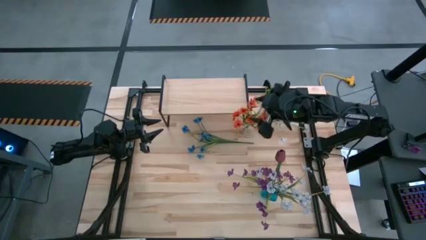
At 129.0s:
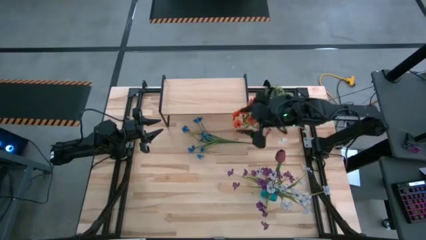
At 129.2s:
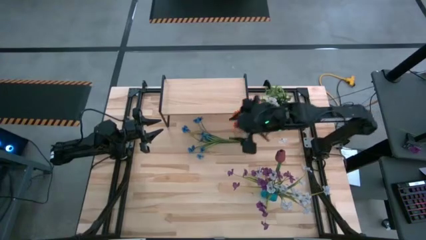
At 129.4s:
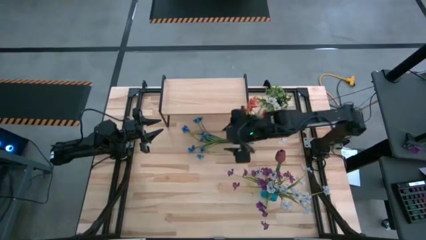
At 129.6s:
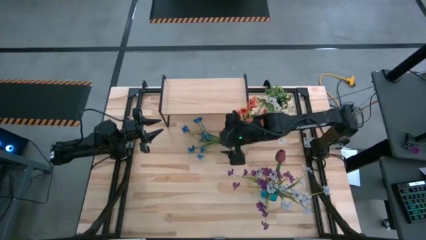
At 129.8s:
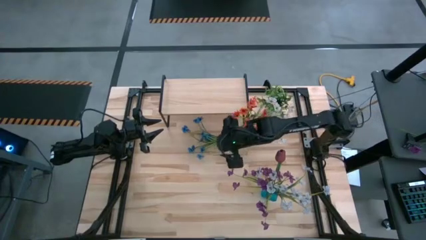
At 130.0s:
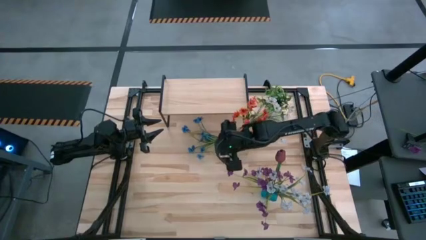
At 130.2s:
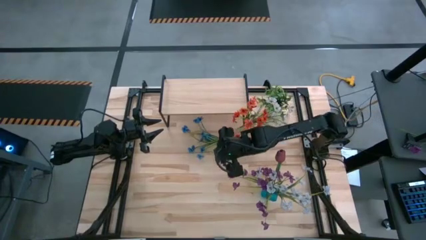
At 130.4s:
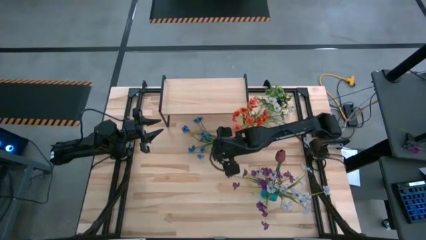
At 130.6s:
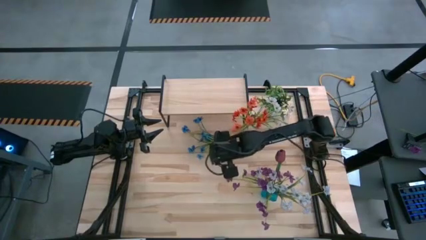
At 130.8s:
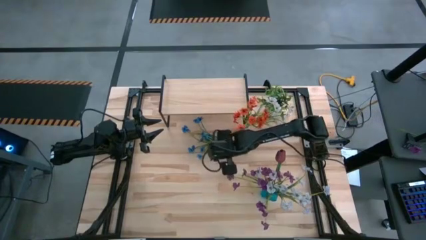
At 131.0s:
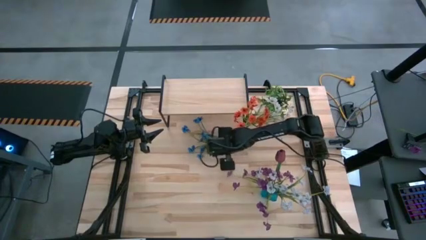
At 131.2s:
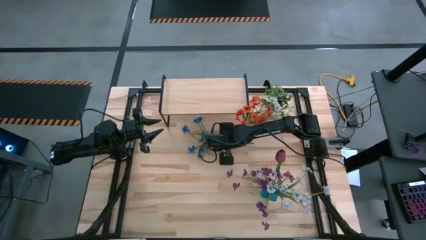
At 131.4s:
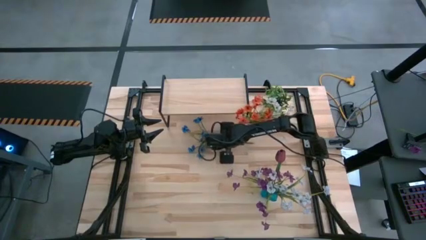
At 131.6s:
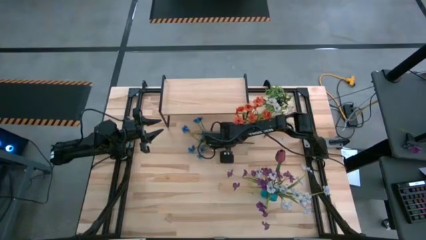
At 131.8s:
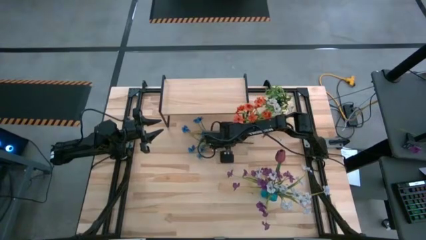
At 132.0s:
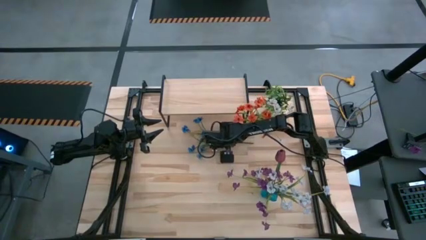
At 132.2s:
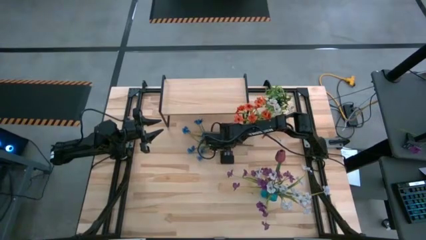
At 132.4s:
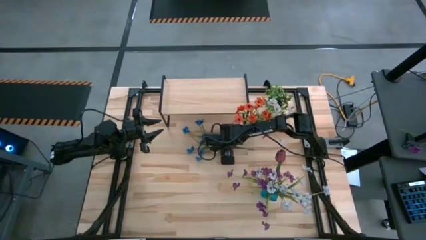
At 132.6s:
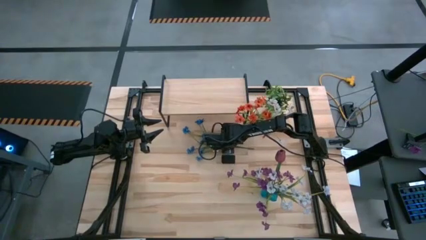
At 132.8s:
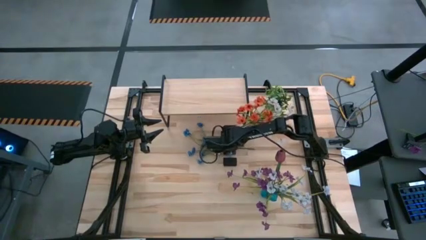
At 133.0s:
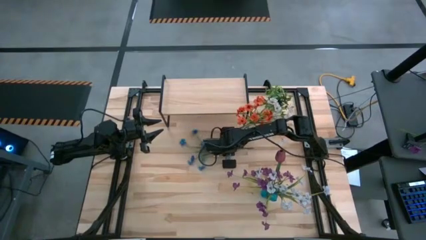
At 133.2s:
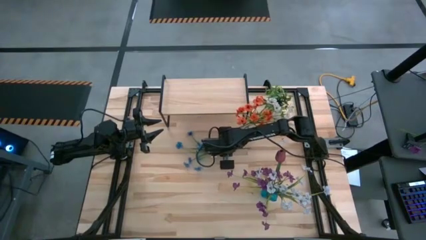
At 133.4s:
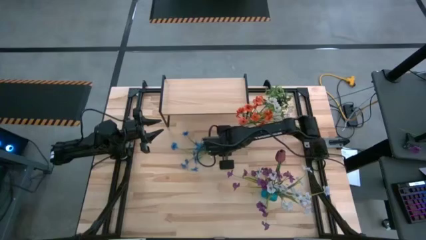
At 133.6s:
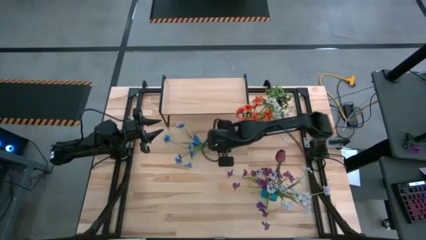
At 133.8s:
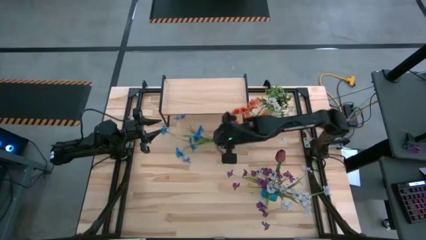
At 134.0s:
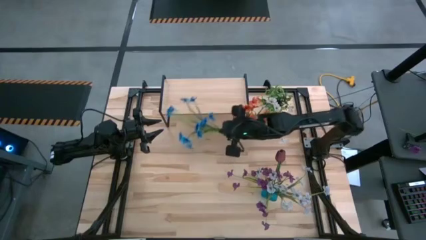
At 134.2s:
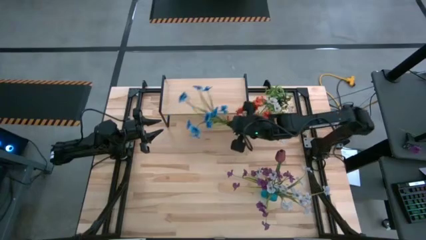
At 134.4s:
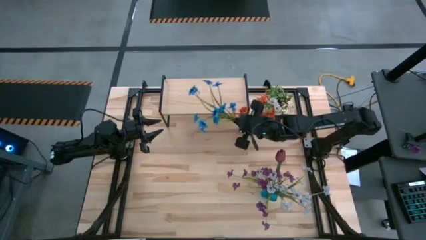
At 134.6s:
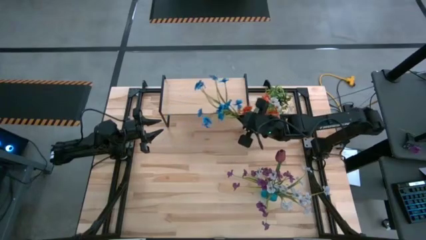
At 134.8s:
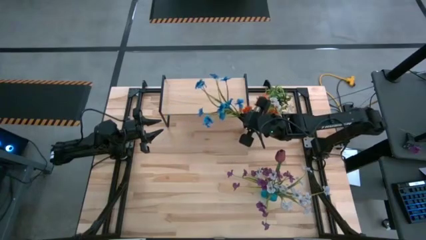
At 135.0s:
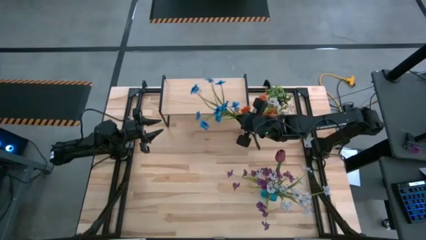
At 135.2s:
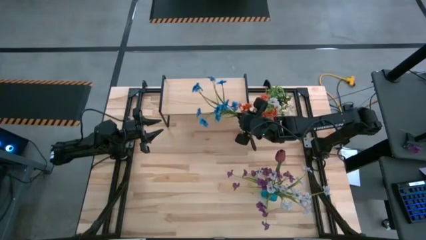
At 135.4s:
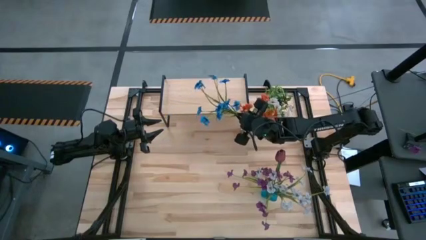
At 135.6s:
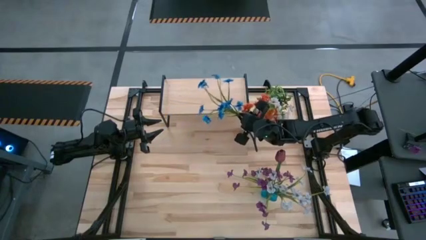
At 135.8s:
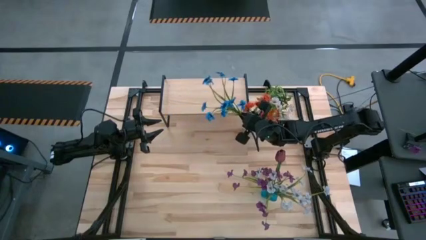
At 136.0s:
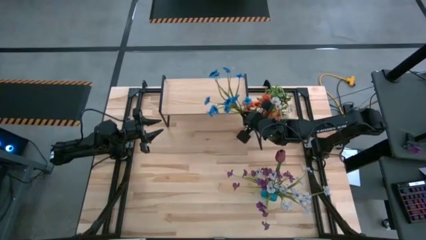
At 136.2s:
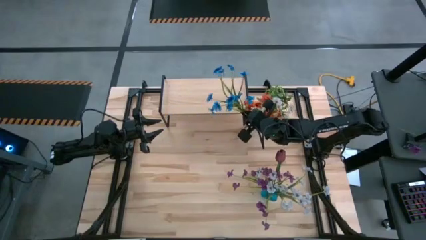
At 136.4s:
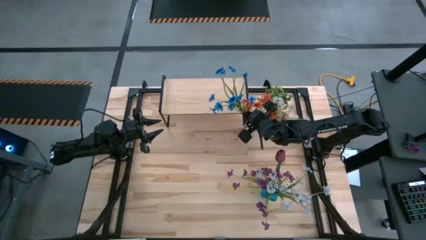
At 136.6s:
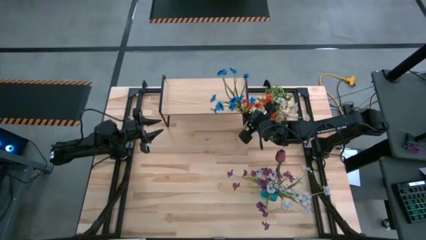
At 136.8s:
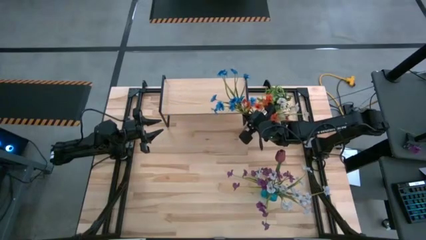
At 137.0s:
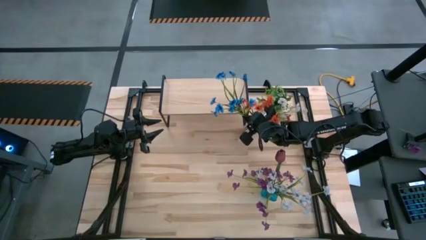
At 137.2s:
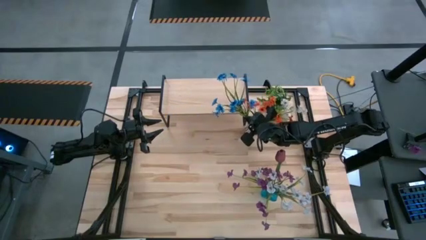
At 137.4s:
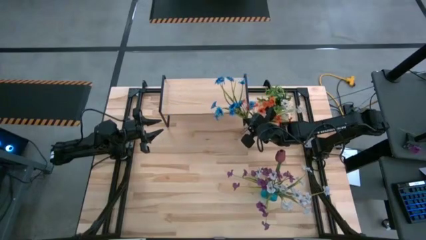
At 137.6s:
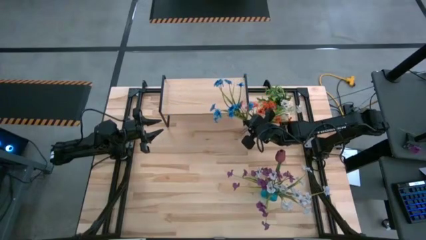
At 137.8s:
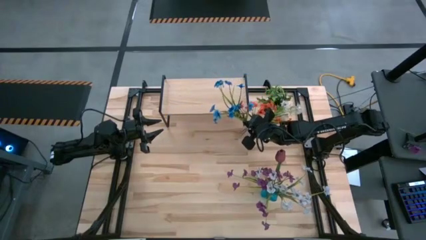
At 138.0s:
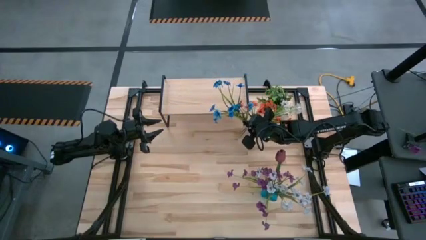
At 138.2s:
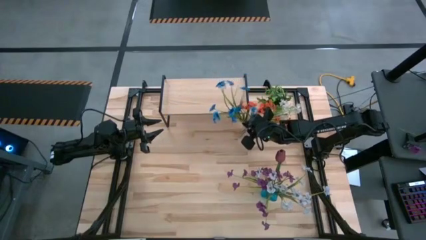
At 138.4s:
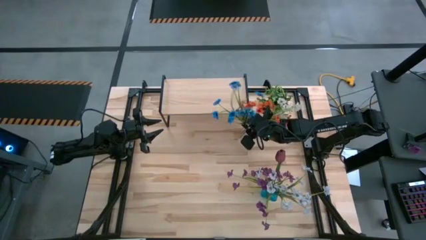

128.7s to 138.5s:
Task: Pick and place flowers into a vace then onto a shelf
Put the blue flower into the transparent flower vase

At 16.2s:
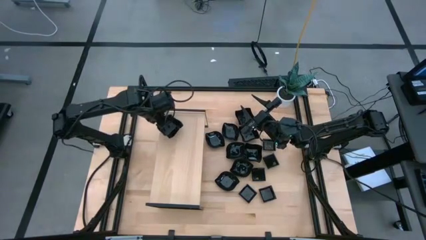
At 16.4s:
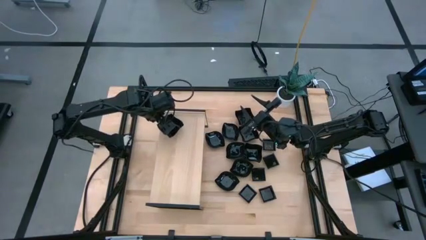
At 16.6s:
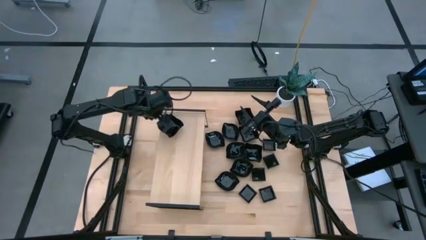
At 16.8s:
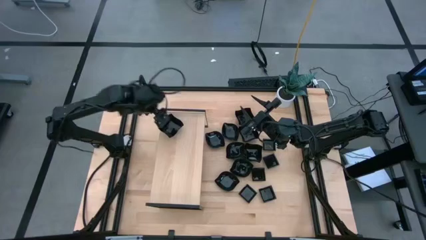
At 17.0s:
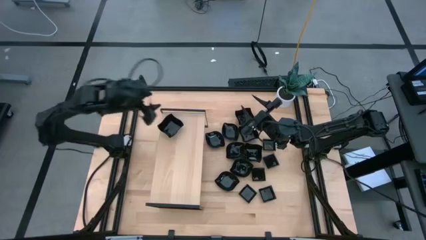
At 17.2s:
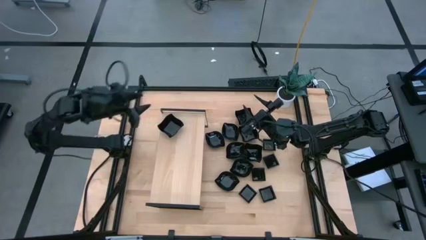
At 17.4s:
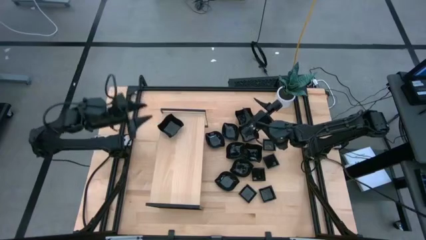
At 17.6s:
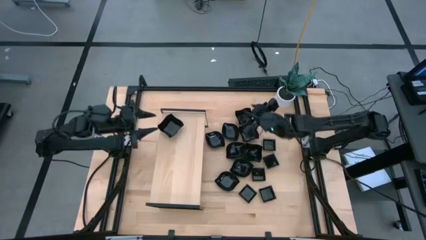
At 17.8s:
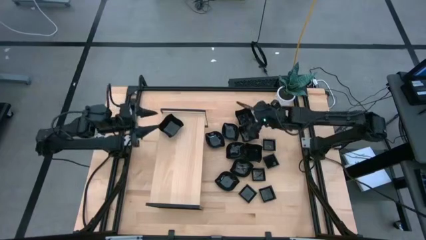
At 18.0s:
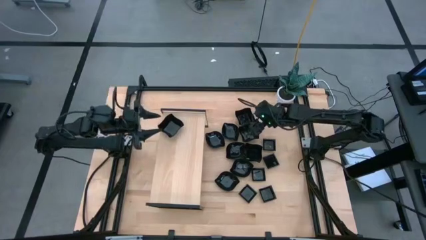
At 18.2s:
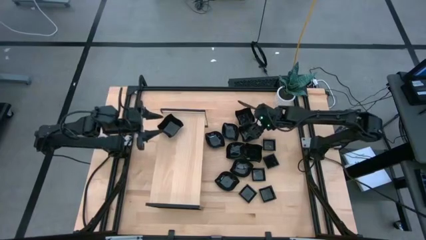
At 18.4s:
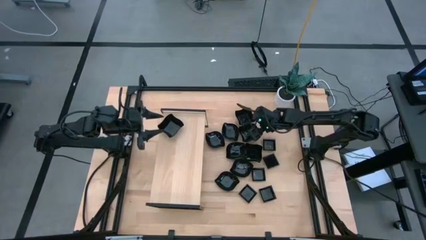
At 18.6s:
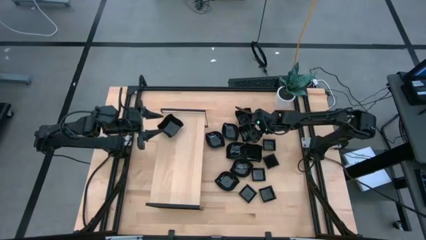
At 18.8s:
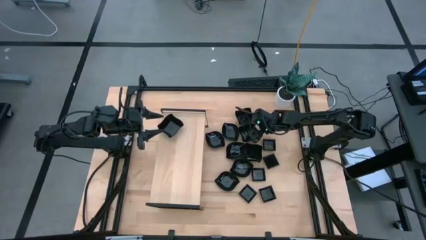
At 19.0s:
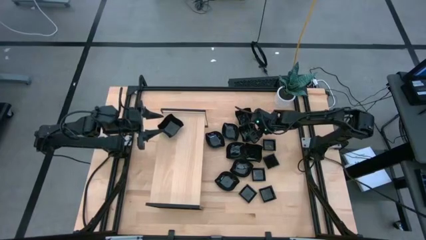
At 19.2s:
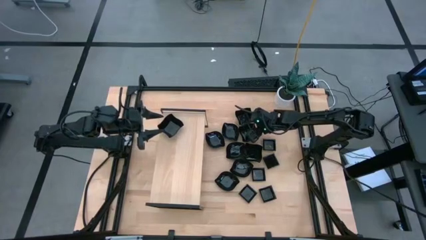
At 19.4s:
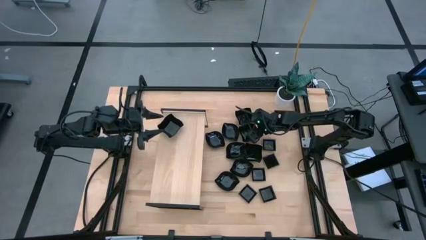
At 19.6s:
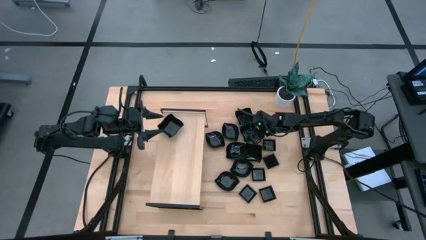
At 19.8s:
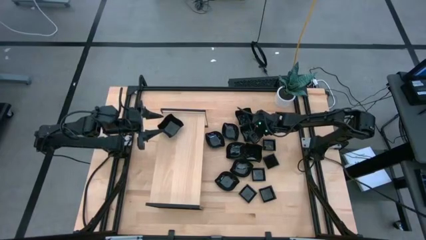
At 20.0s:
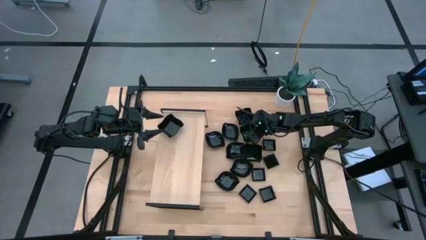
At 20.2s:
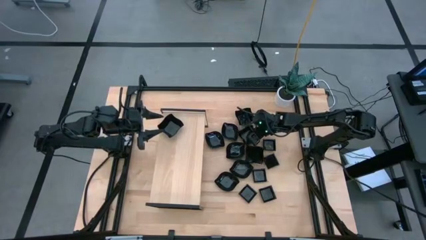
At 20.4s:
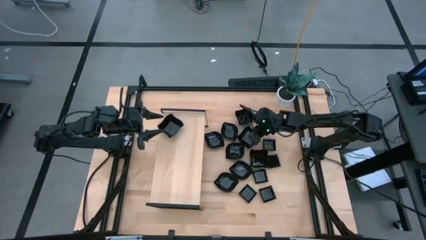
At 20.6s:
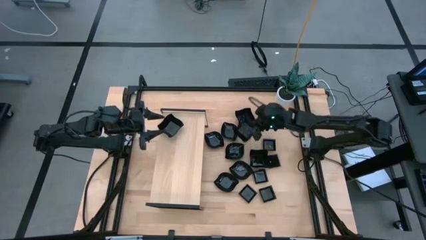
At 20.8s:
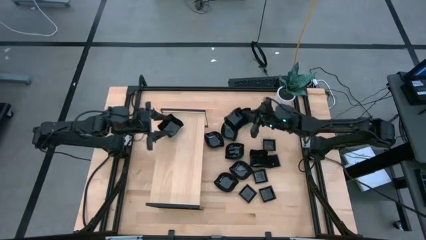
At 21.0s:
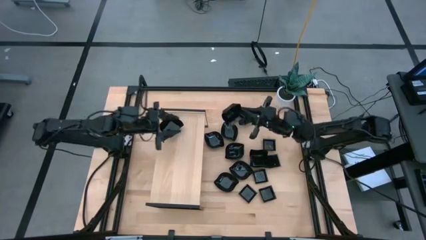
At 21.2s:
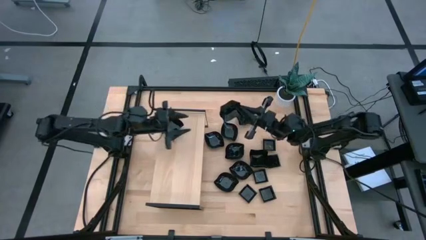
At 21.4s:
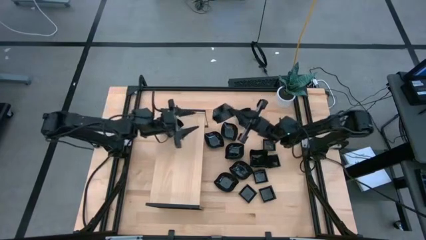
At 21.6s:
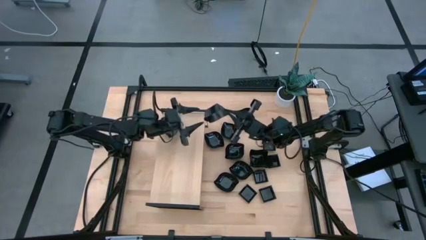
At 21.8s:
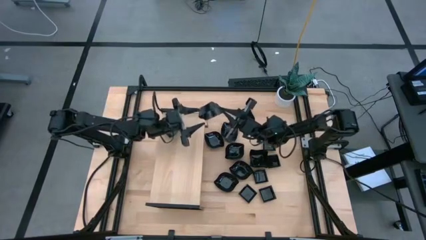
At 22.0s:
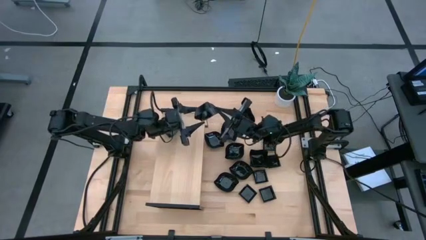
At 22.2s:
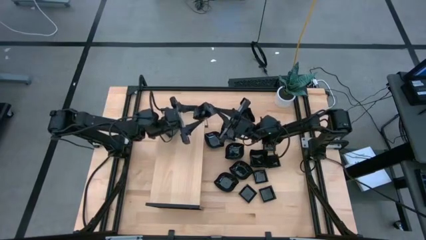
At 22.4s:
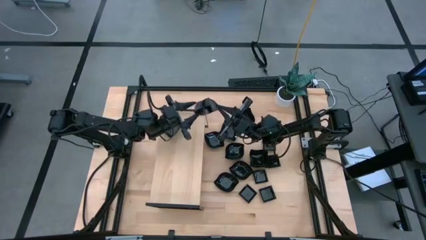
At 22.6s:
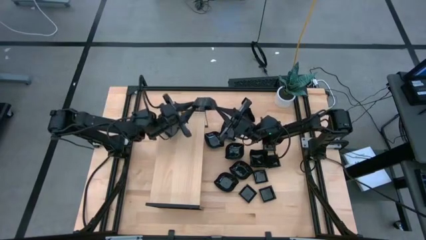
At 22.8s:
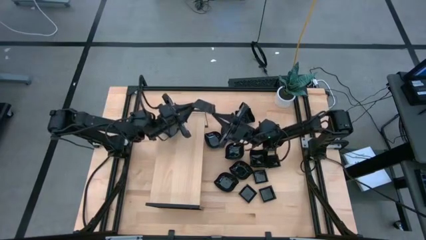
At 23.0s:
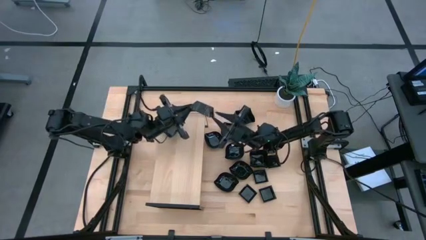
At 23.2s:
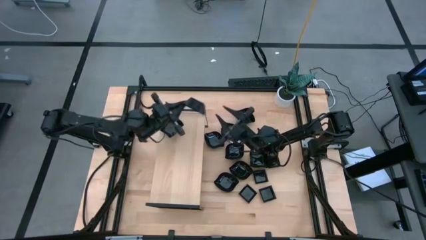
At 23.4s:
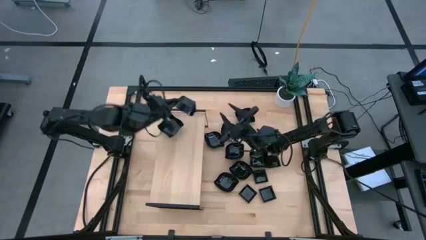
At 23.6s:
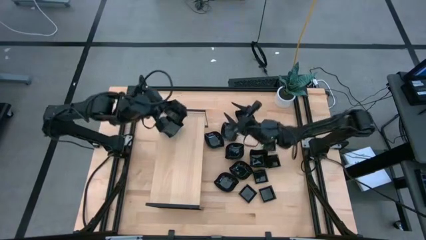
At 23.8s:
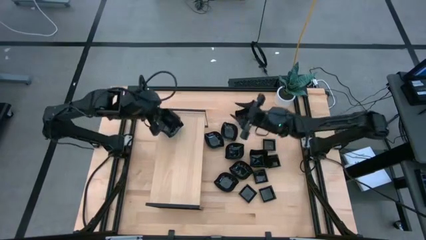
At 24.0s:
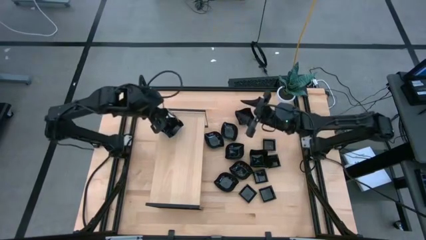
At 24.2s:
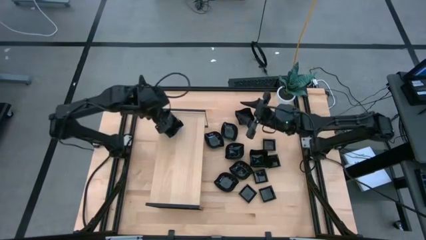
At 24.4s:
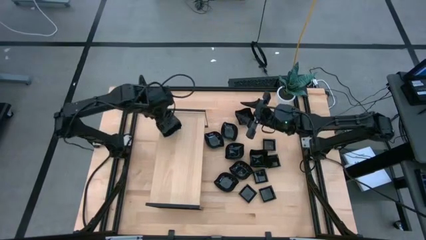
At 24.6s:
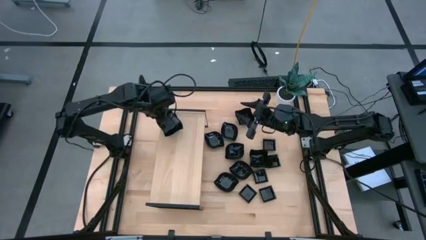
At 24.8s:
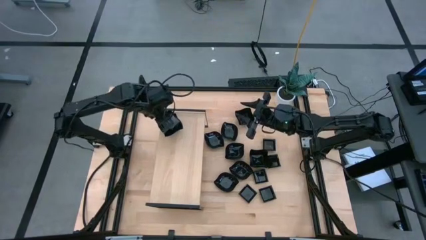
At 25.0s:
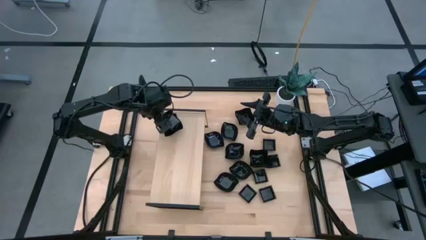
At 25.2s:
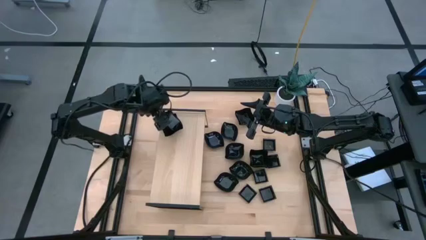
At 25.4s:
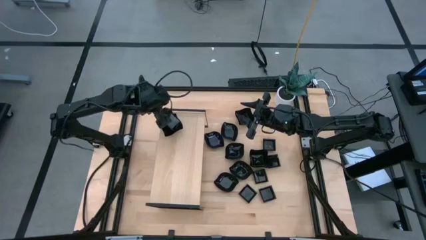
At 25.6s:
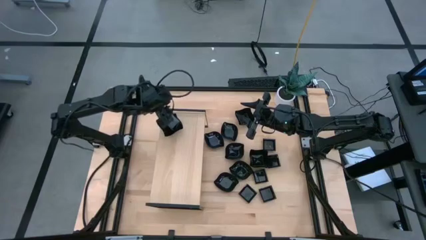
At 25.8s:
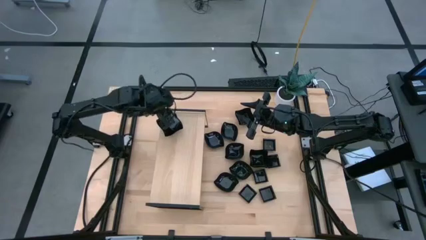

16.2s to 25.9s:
Task: Pick & Place Mini shaped plates
Stack the distorted square plate on top of the distorted square plate on the shelf
